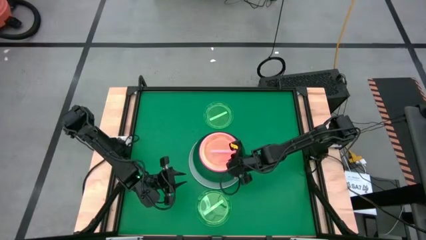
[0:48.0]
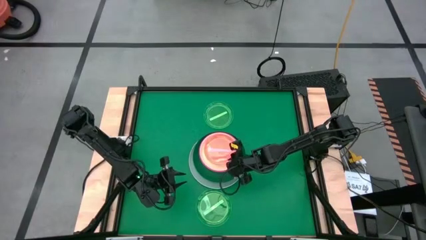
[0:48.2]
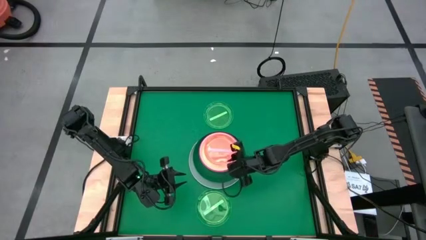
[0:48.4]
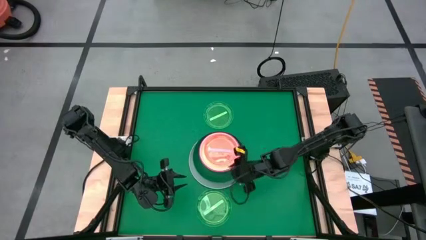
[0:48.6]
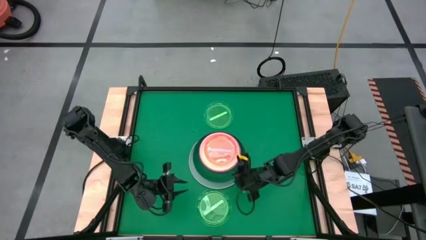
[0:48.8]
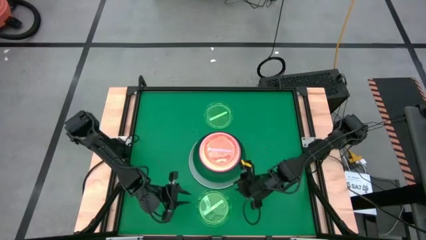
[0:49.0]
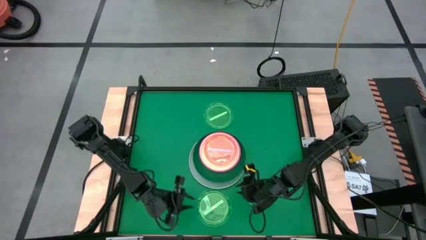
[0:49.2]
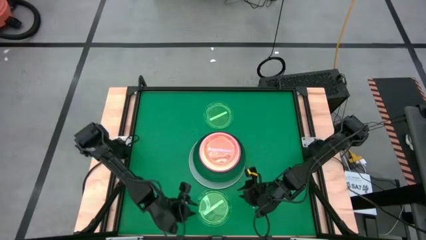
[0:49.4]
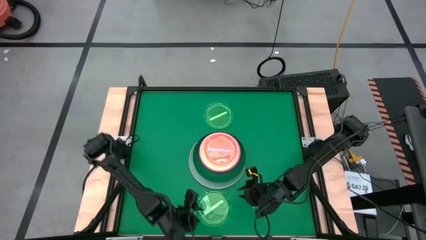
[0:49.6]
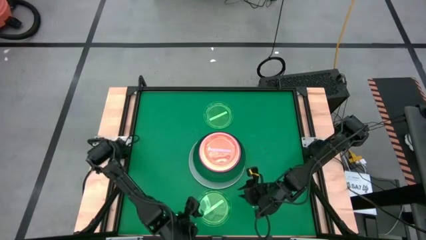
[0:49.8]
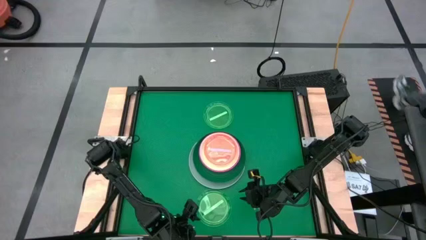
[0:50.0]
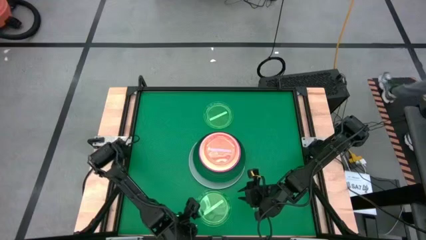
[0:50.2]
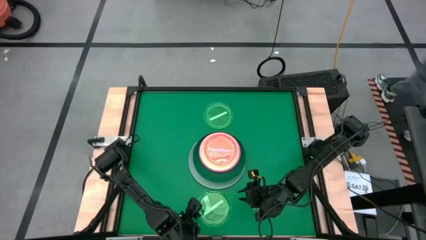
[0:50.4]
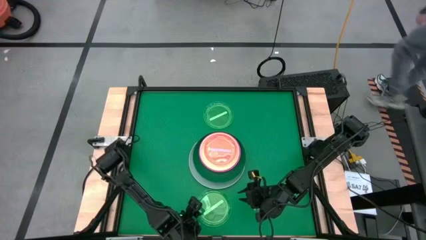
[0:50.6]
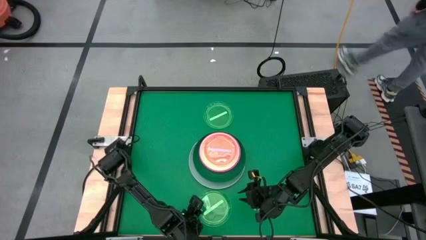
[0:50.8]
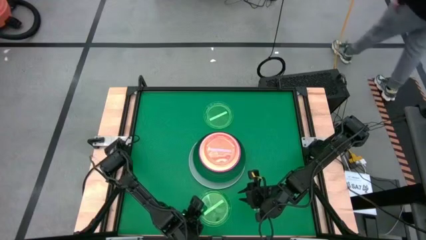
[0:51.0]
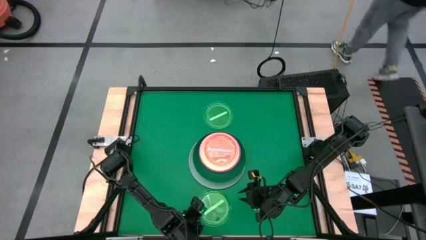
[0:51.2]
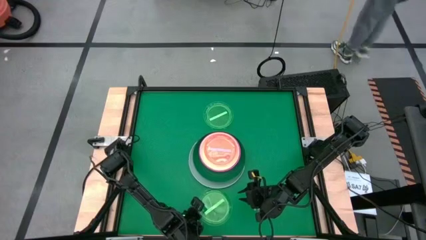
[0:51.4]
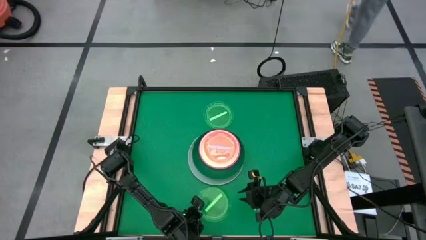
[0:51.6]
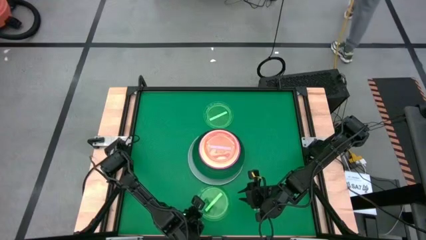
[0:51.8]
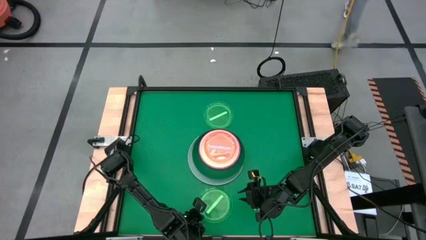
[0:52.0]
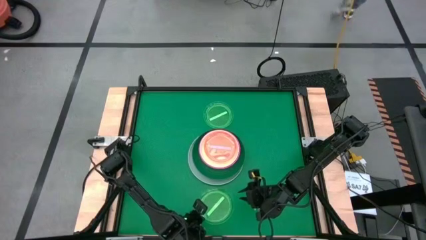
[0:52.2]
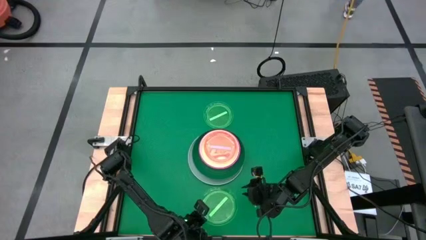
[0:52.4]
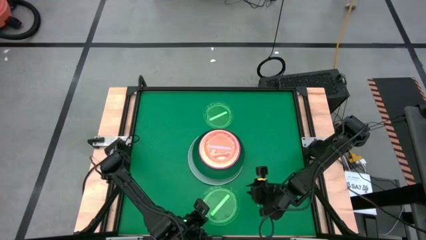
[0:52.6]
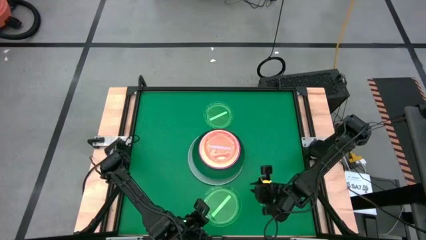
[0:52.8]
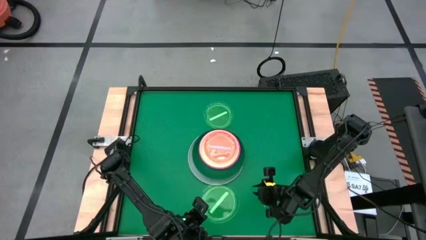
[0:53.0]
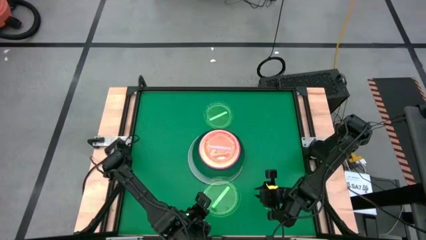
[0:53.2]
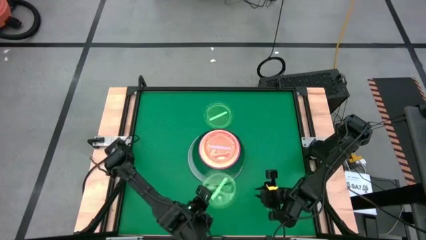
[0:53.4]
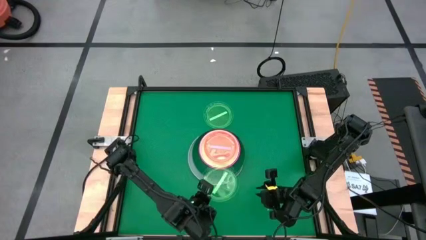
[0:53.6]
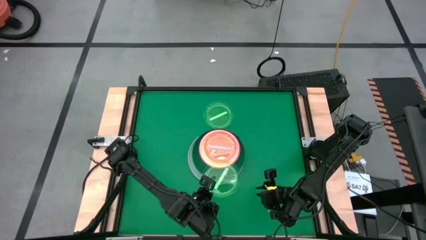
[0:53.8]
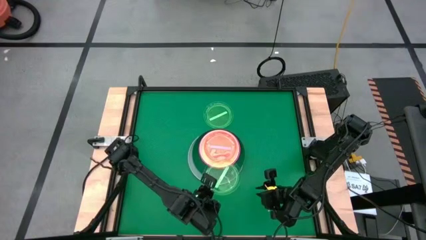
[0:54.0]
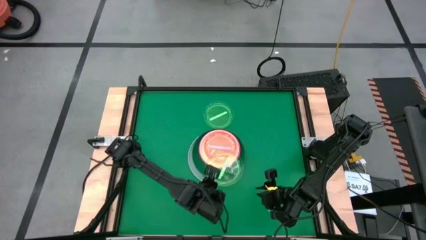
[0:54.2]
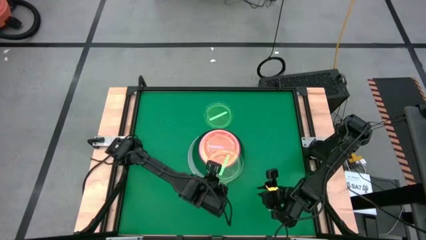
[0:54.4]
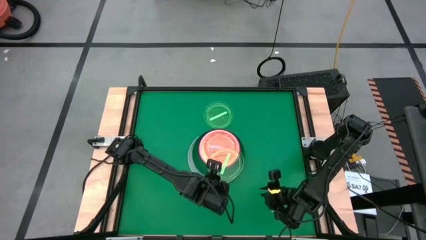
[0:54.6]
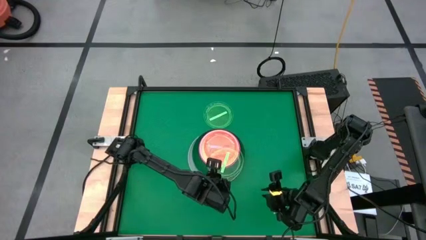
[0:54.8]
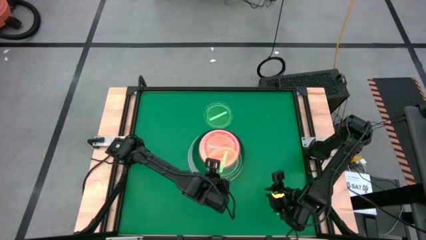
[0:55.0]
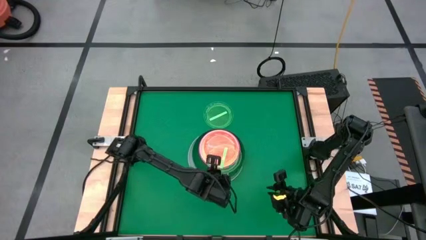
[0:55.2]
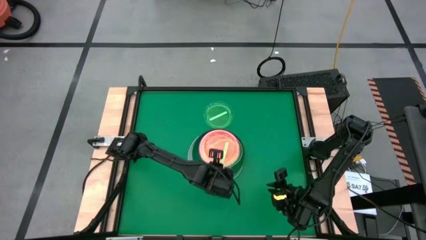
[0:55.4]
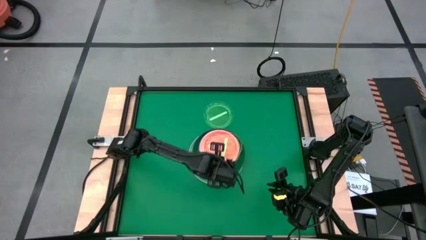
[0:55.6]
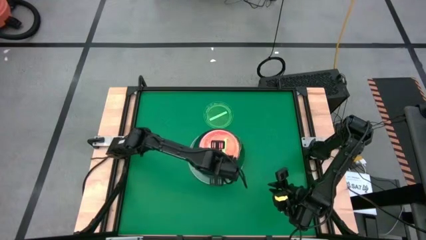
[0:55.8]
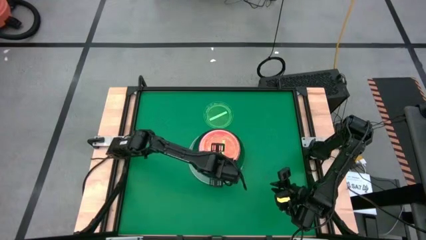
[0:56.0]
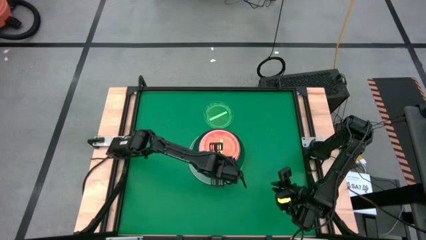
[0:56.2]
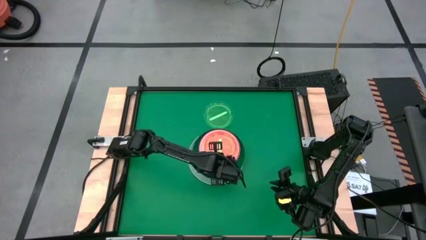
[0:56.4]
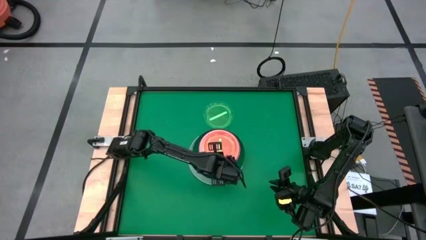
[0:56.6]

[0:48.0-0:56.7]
Task: Stack plastic plates
Stack the bottom small green plate on top of the small pink plate

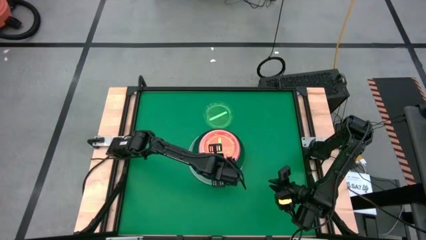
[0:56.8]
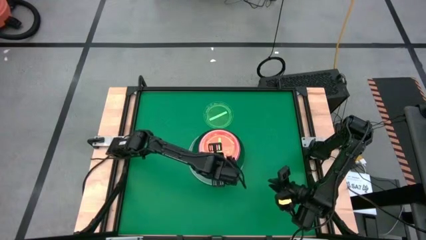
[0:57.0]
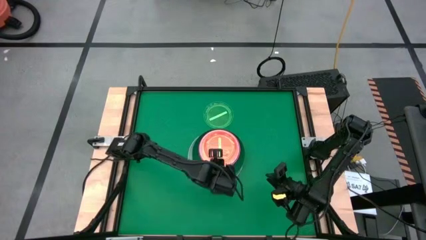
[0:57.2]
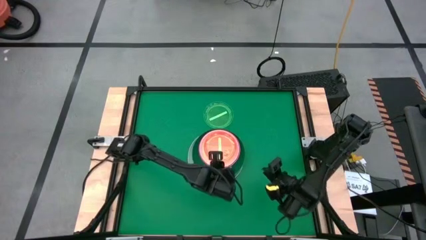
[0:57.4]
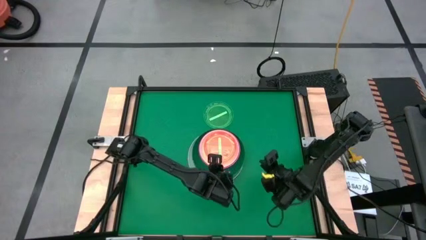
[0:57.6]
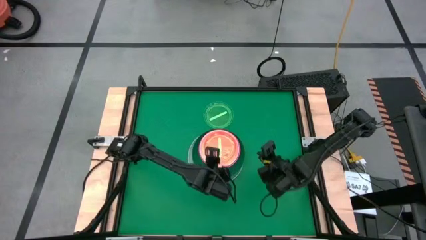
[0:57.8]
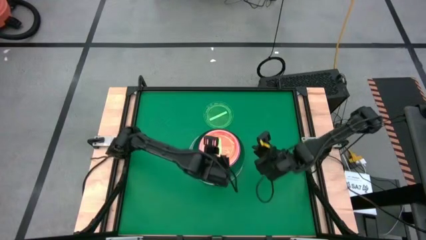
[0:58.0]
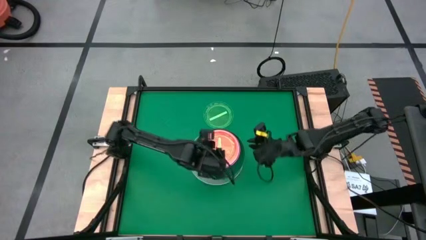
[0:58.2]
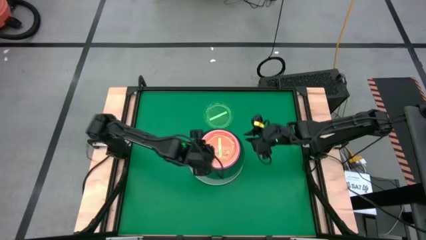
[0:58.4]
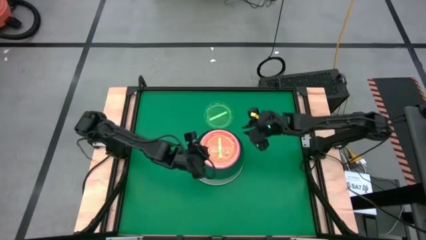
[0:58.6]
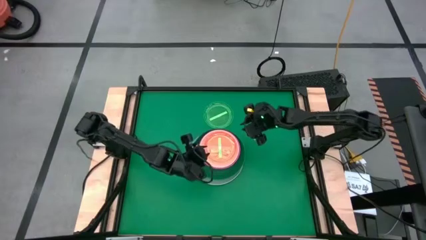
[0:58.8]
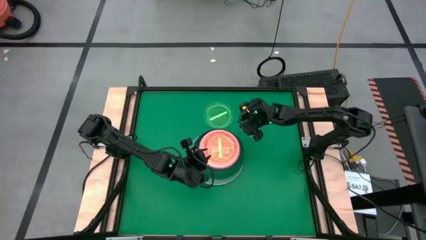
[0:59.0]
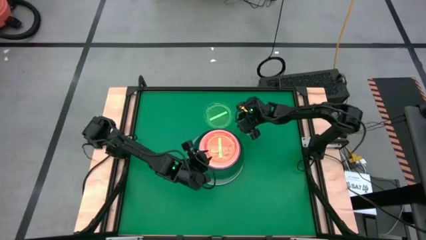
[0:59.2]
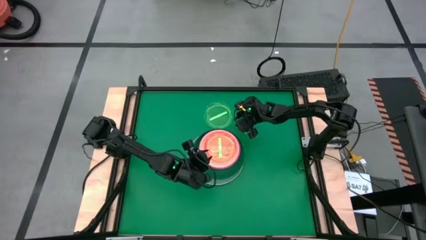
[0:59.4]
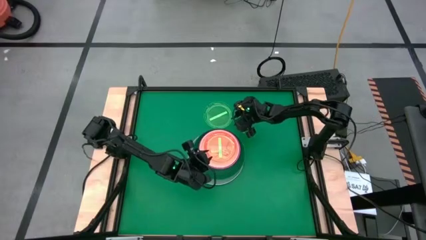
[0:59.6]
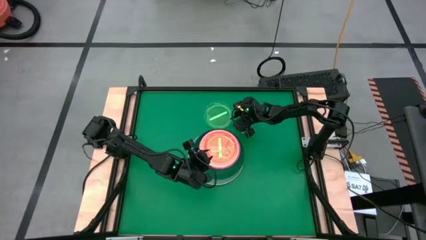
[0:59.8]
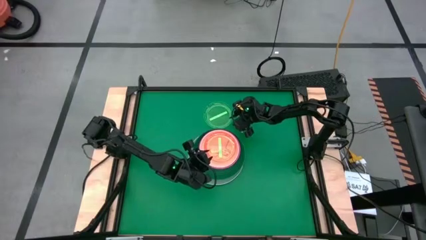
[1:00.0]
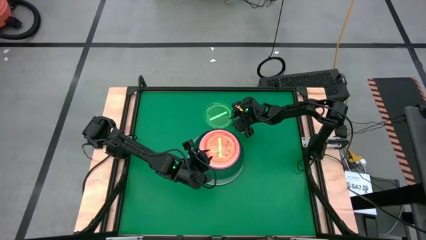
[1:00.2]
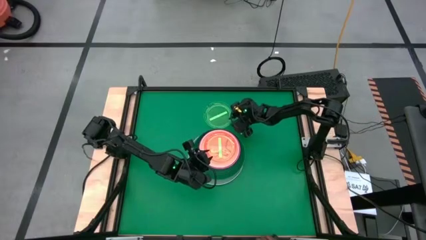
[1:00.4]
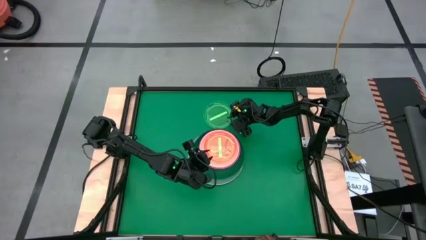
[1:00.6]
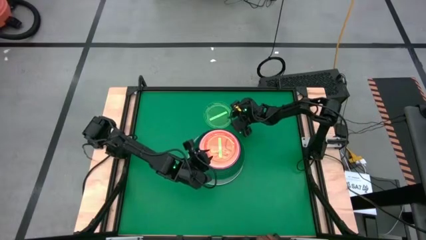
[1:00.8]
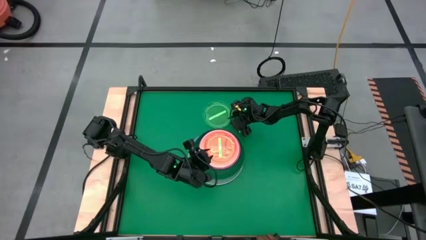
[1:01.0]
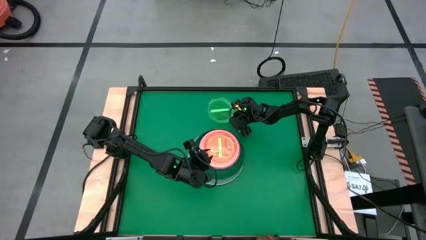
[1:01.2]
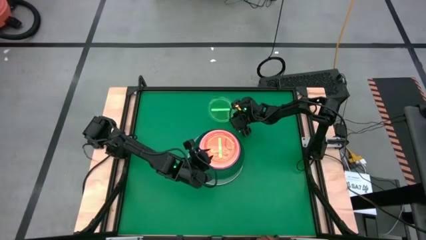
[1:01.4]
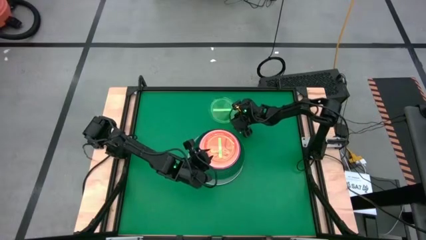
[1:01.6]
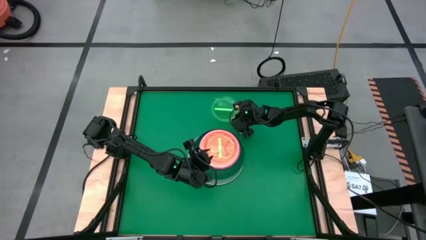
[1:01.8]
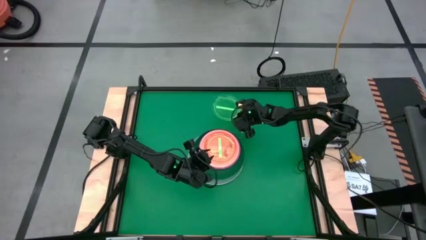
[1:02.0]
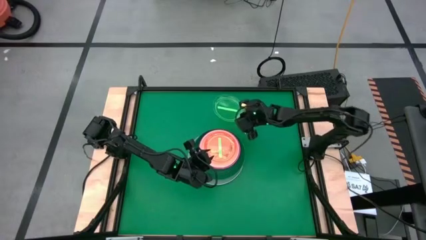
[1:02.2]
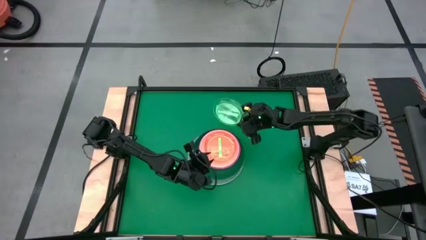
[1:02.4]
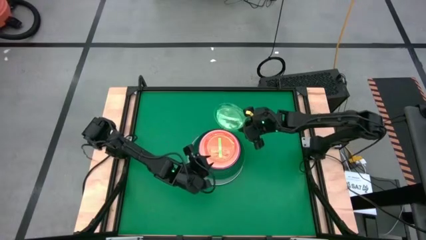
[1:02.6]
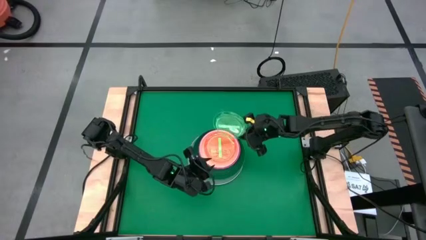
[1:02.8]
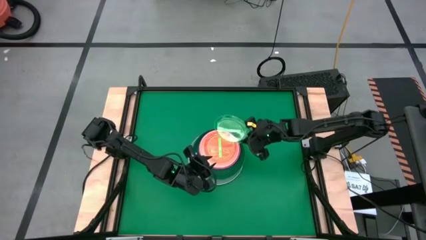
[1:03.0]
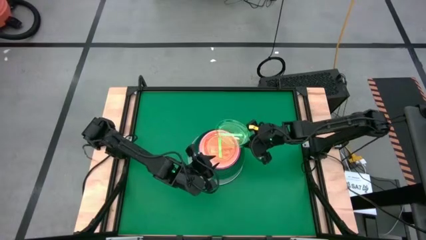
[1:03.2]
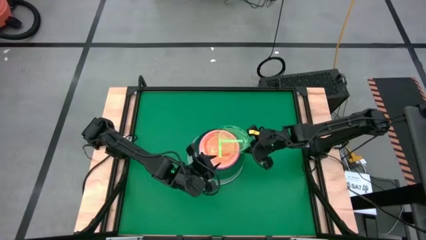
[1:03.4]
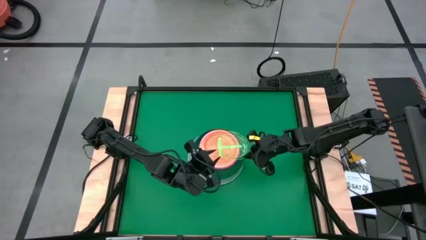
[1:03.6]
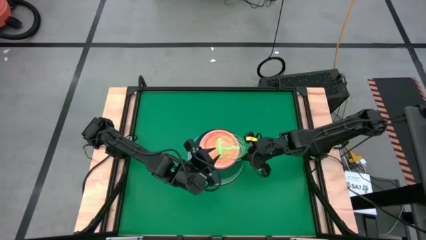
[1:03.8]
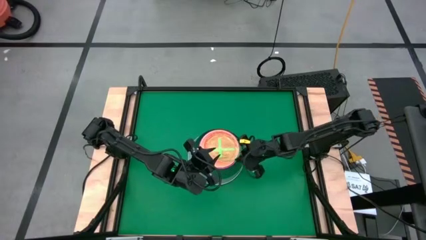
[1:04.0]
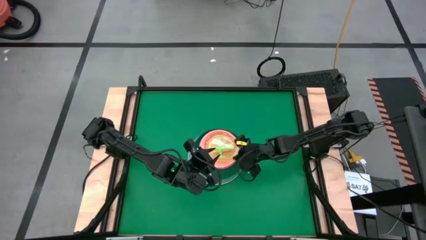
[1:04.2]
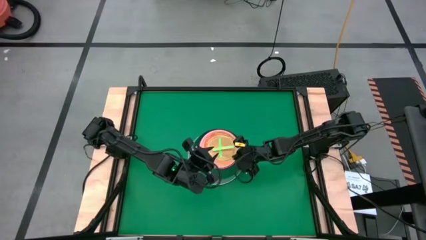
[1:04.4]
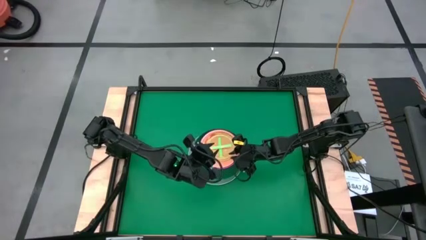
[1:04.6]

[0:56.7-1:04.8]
Stack the small green plate on top of the small green plate
